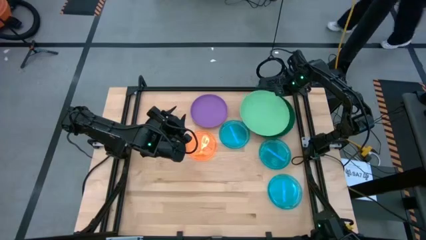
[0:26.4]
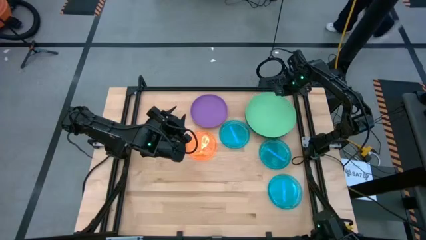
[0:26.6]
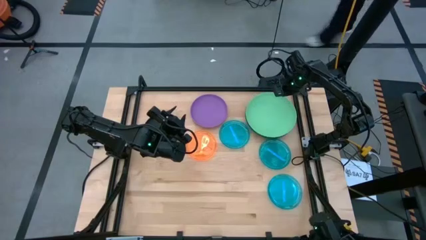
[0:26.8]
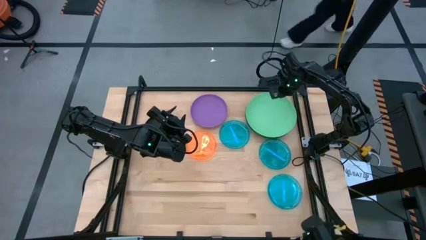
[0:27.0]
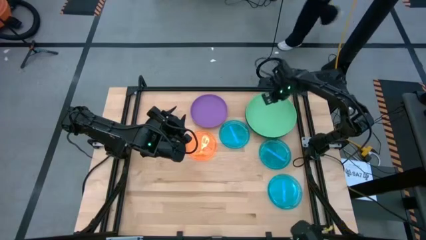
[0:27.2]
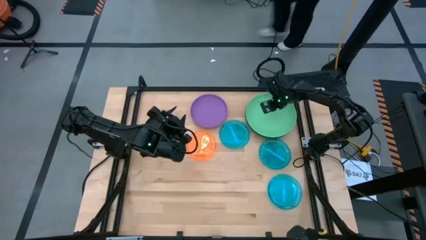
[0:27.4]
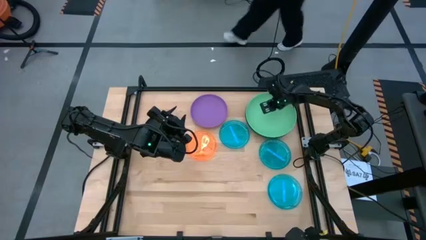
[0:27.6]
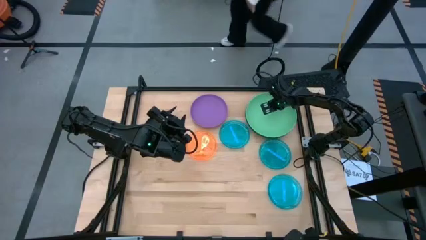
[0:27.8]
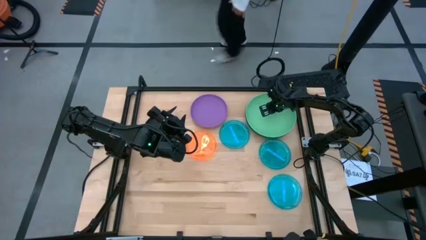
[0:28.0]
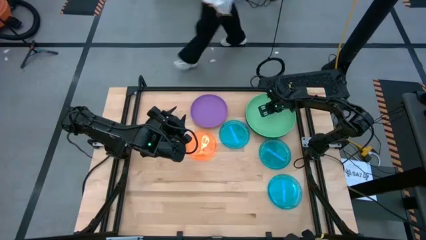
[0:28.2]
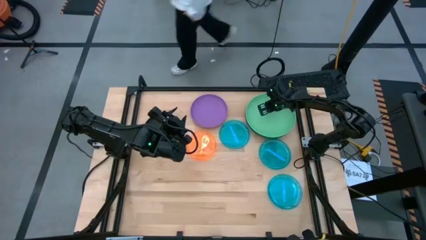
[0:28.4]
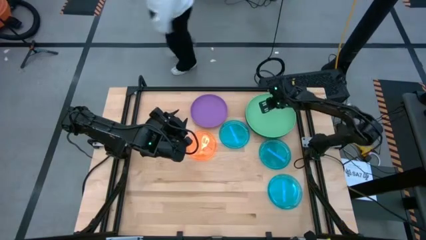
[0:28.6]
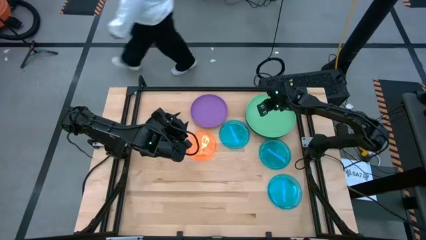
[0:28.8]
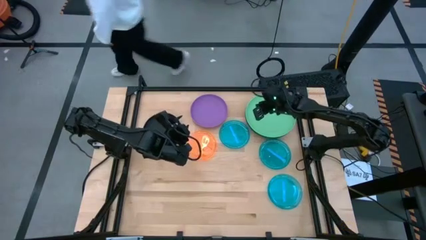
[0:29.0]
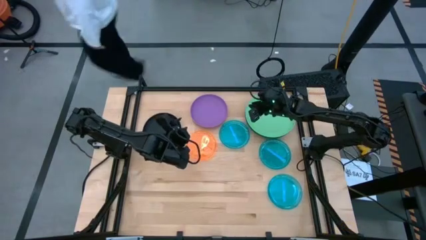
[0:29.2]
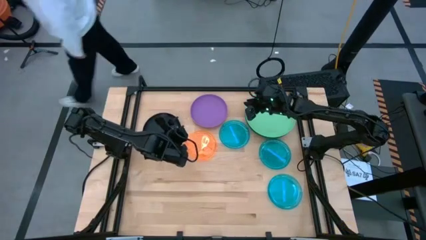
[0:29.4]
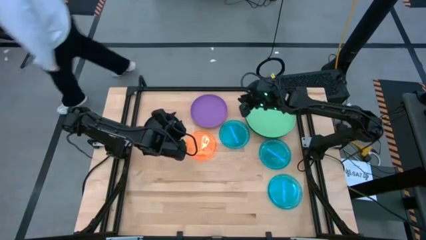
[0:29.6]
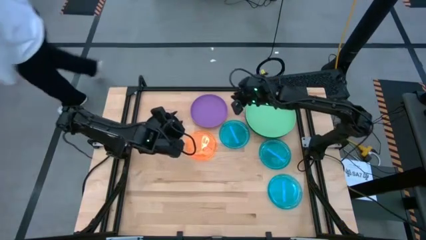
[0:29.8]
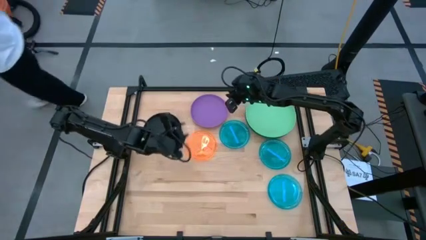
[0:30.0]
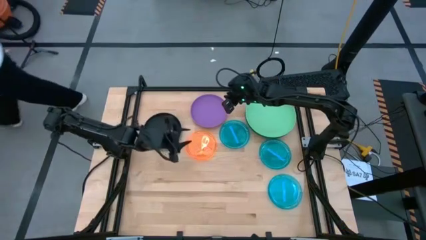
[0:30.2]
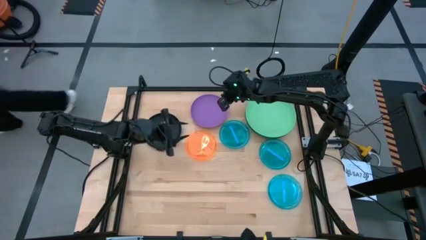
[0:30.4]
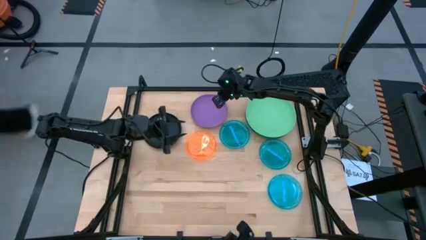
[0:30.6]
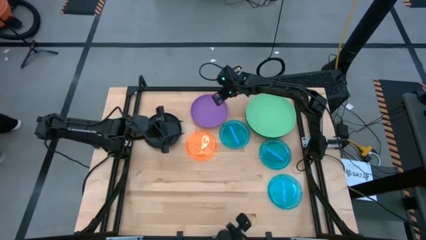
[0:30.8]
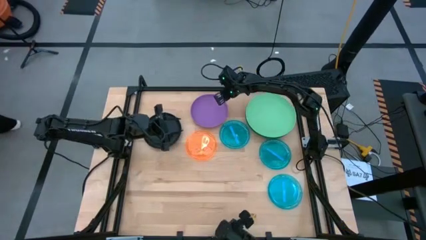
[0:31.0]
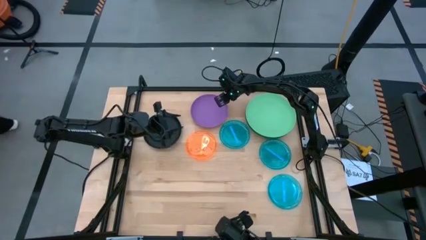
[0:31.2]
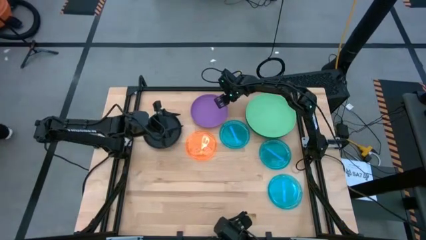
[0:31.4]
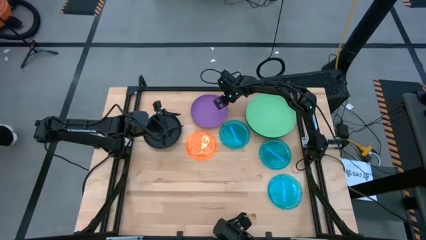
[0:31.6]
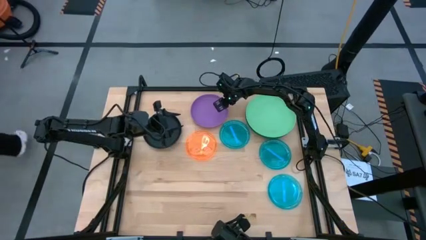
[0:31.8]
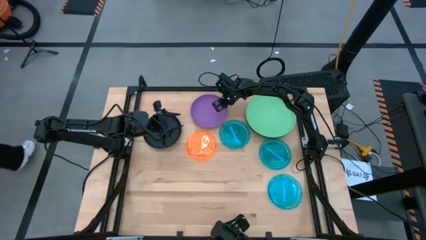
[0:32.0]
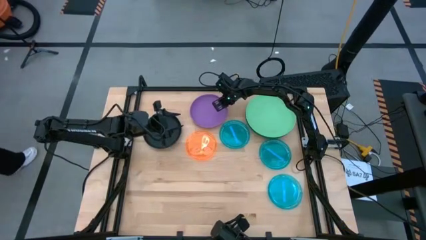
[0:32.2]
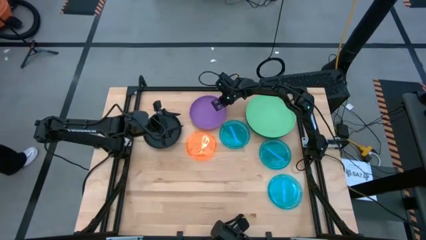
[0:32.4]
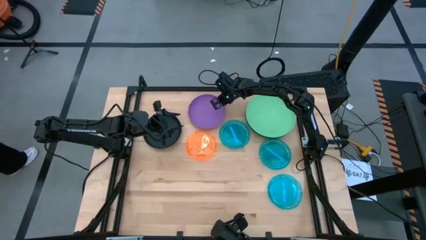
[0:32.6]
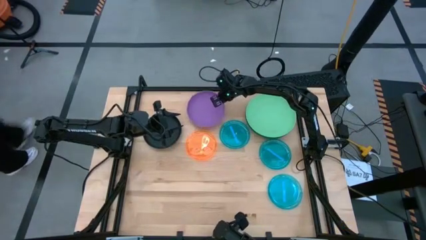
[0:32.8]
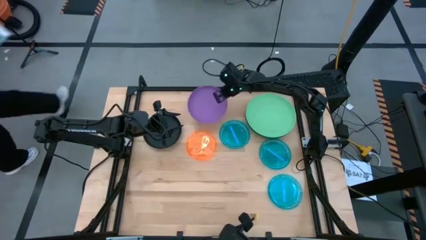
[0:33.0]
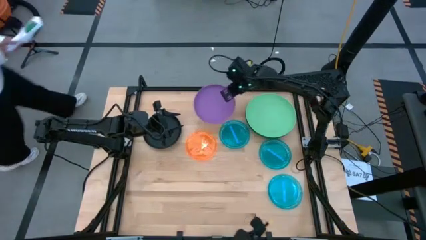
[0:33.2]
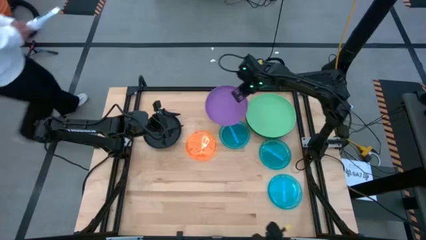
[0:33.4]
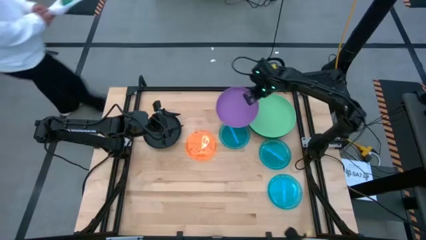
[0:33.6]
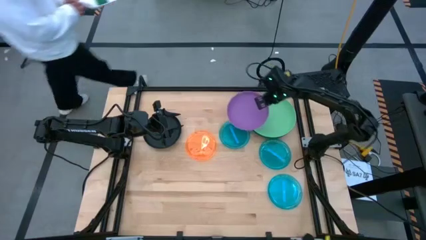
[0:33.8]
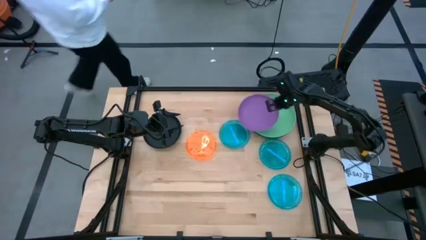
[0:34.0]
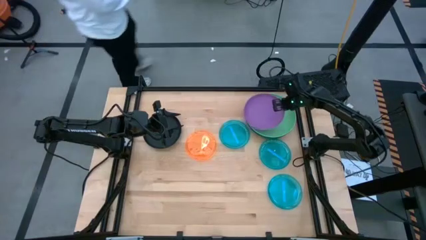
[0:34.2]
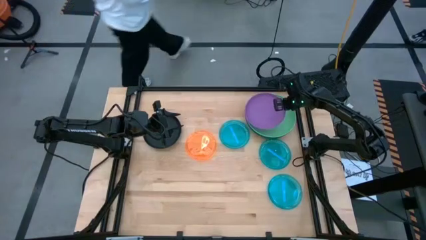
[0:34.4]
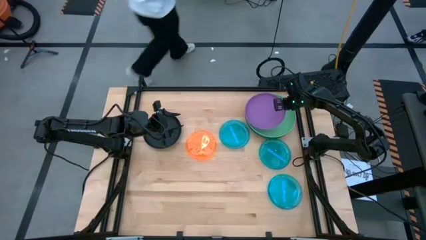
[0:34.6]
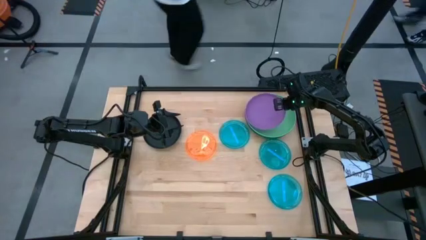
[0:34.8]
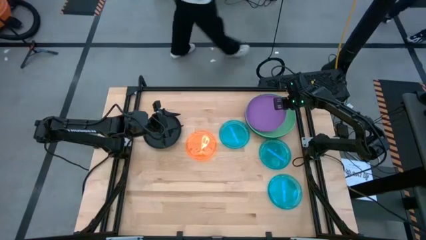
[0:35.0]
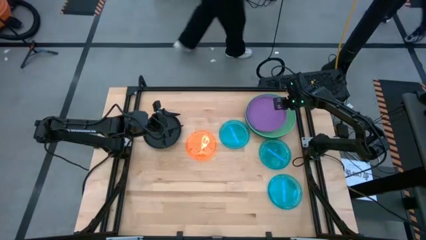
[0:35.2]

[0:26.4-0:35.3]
Task: Stack plastic plates
Stack the purple plate on the light green plate

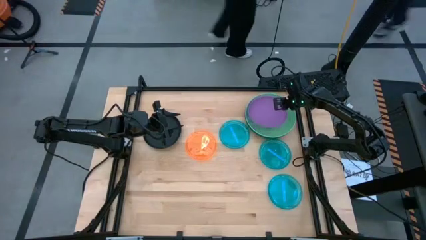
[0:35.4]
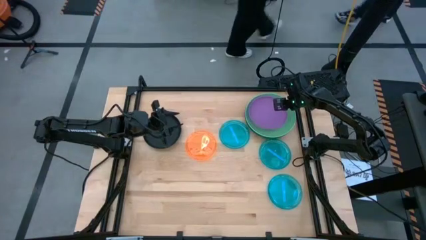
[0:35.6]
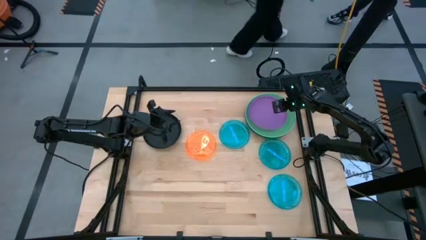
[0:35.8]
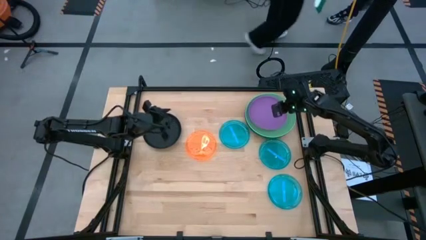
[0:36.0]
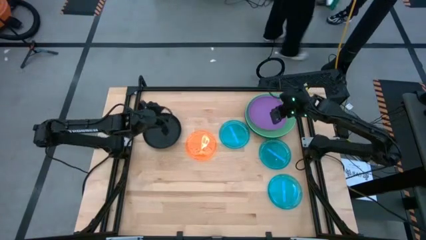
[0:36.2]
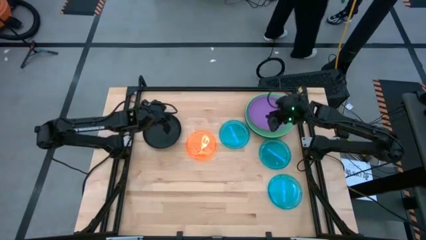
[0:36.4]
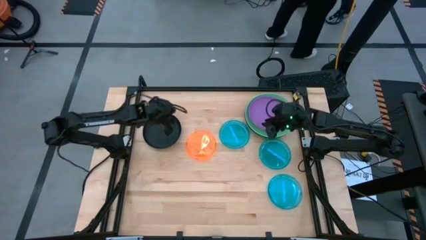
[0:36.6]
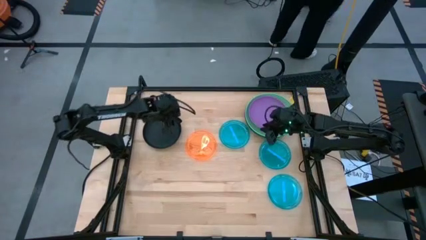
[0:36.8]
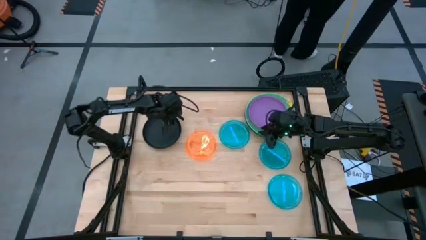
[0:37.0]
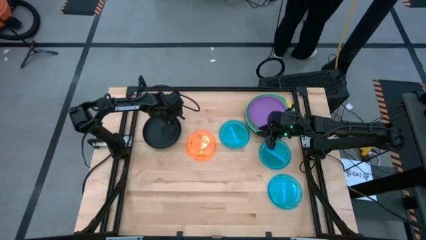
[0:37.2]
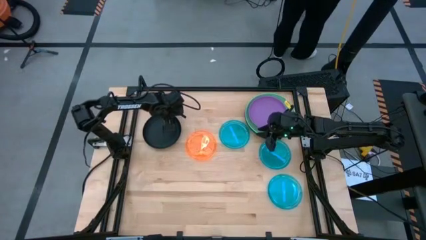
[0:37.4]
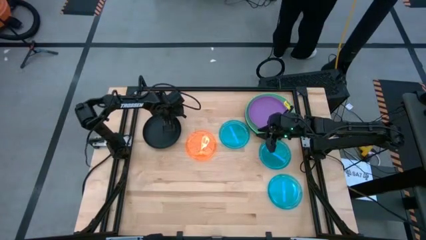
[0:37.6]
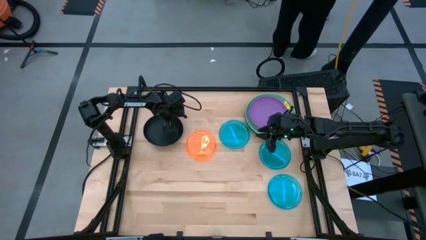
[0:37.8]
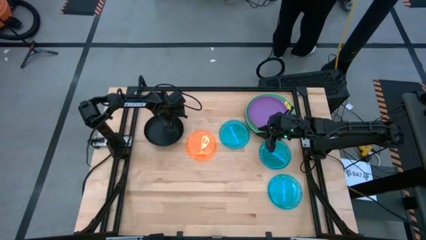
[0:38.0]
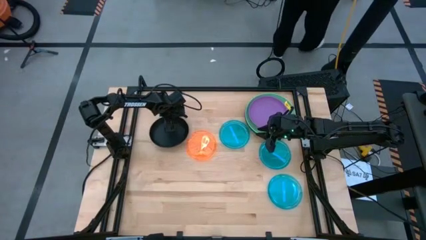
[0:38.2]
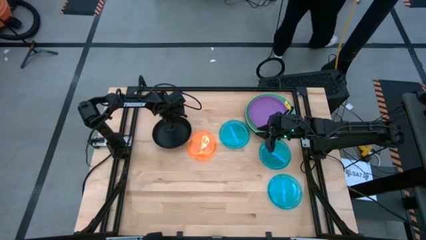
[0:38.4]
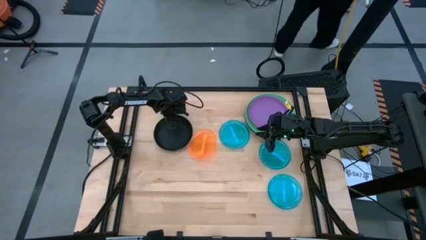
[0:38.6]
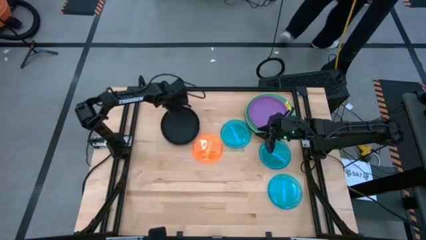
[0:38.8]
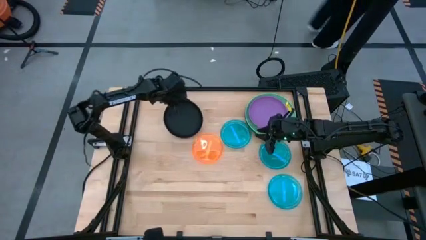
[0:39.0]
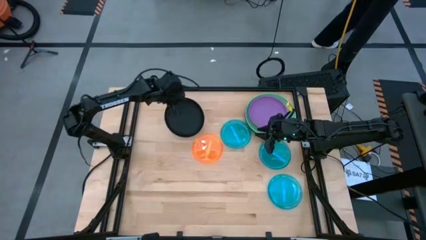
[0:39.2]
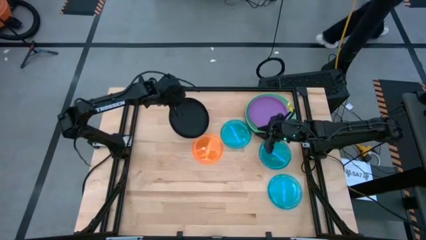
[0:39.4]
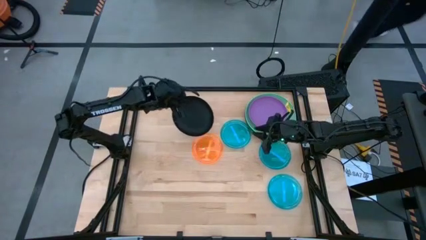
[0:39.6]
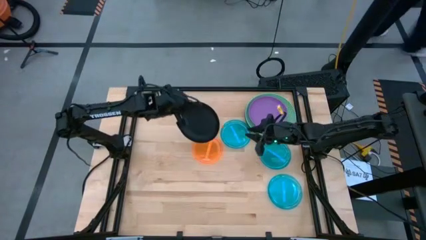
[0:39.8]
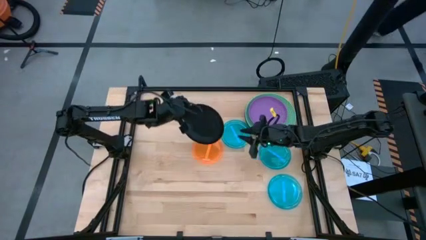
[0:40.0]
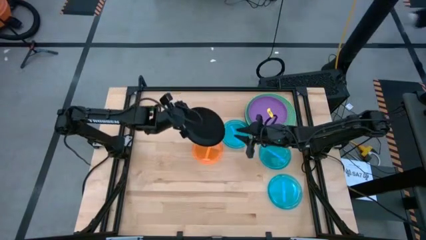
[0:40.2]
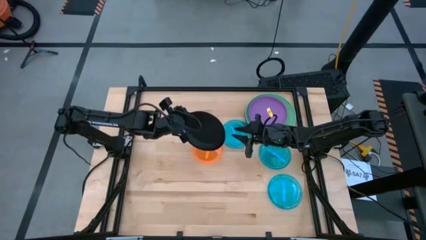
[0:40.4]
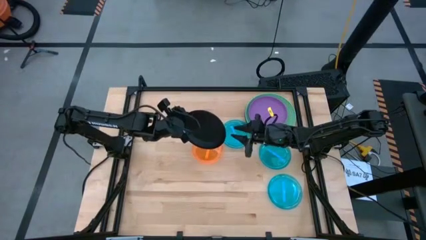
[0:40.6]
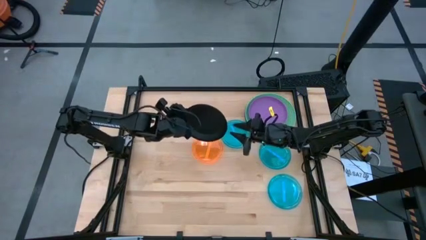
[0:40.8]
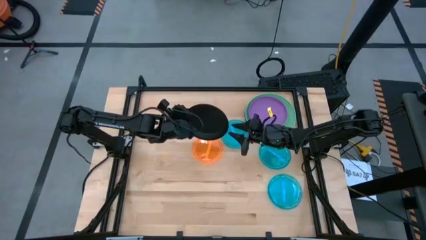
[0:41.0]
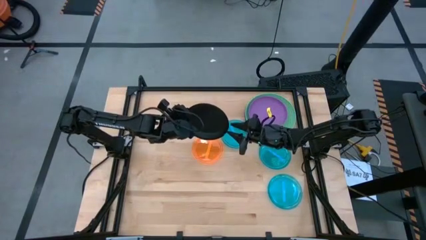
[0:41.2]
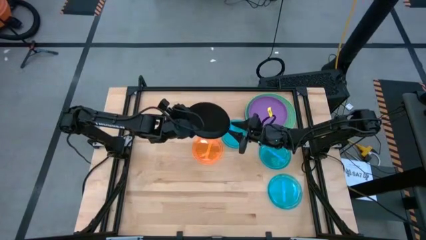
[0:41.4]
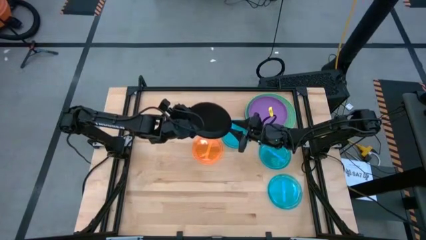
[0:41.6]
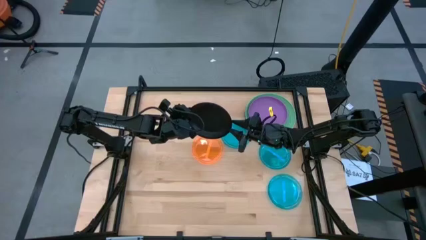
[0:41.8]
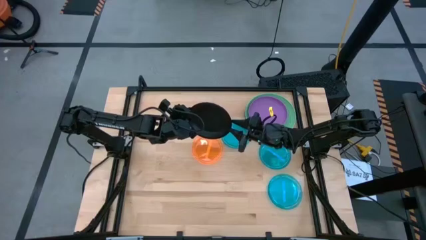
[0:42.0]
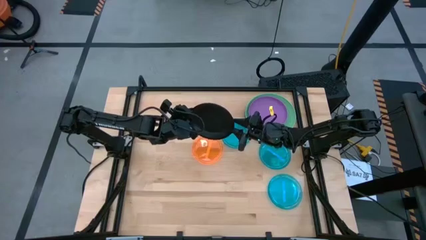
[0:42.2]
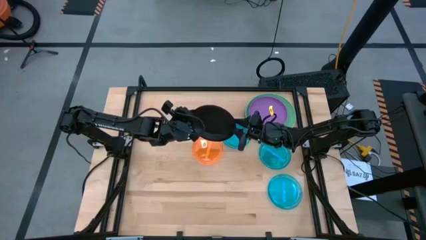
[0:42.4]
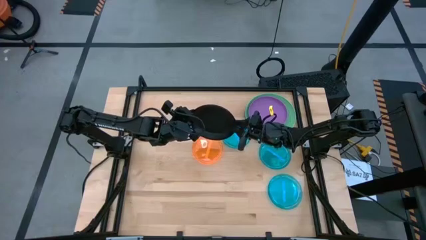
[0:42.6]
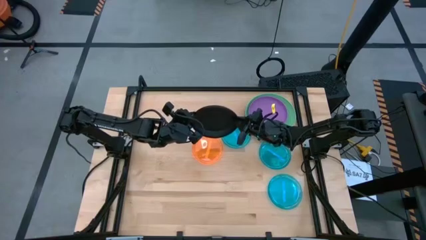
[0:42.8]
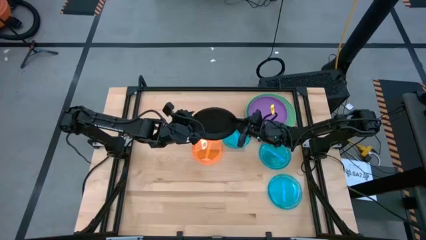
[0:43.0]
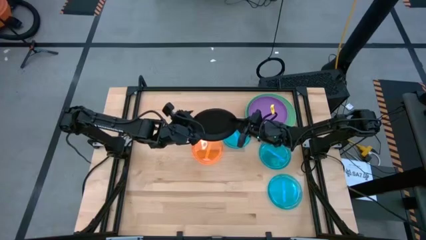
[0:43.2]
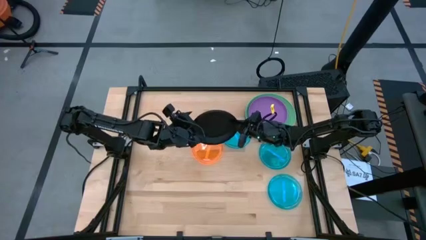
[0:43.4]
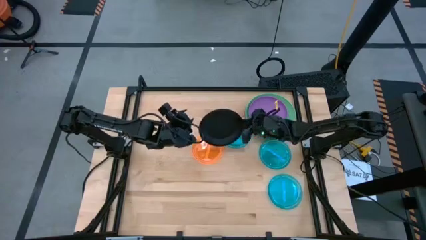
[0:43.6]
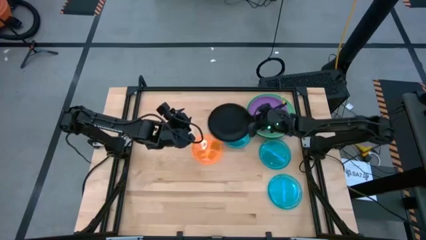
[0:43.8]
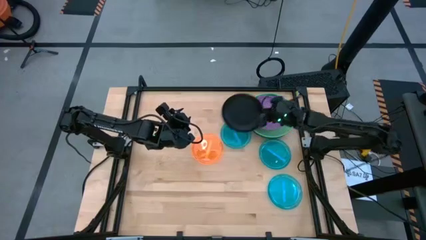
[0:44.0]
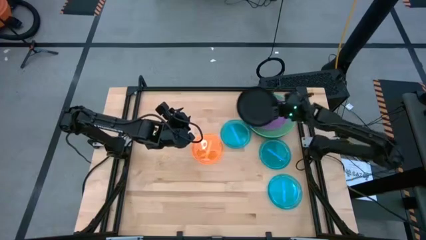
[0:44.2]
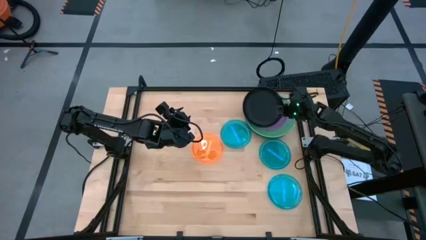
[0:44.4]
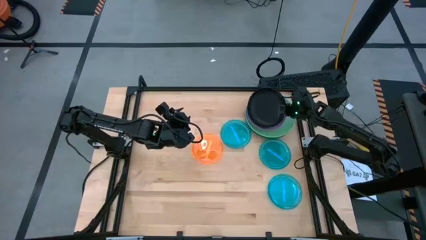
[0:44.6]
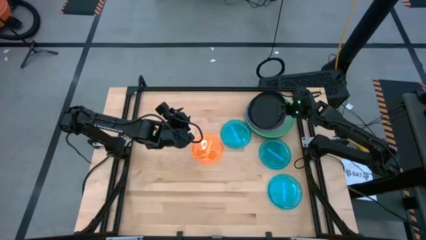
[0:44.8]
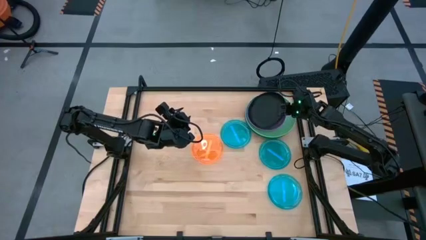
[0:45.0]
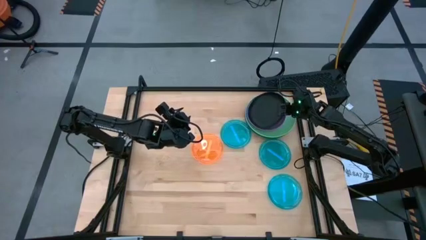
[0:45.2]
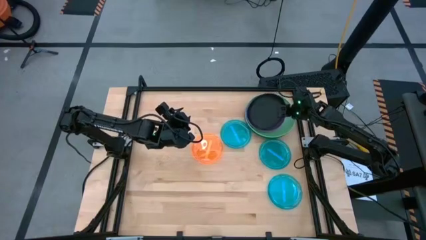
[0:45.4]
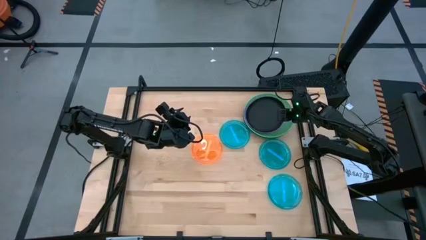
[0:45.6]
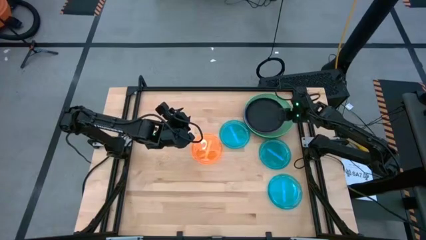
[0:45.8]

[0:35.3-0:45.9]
Stack the black plate on the purple plate
